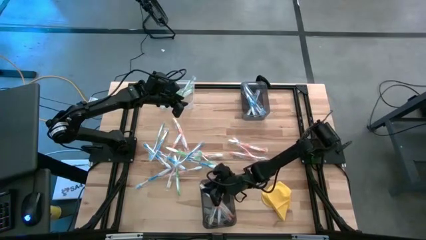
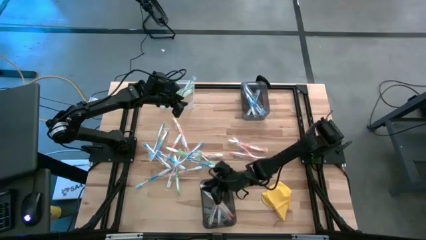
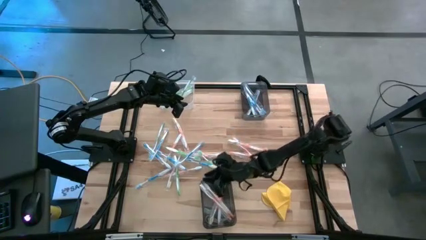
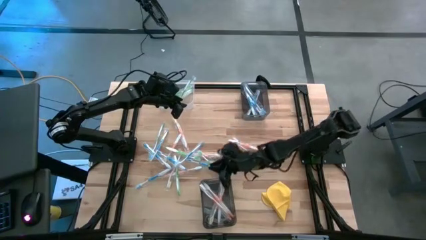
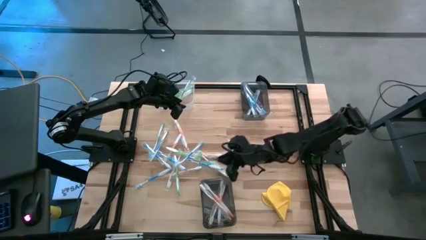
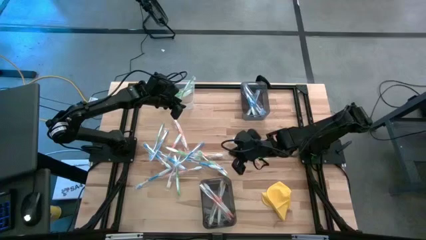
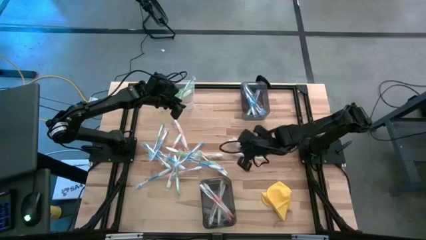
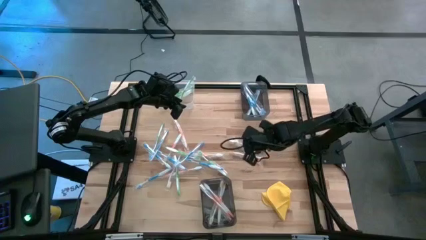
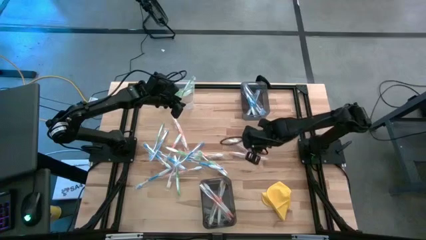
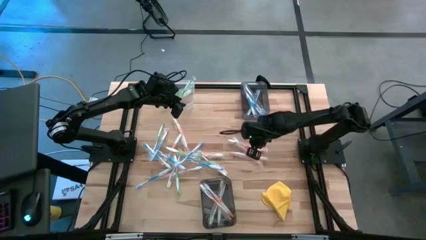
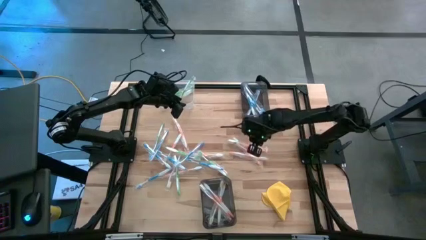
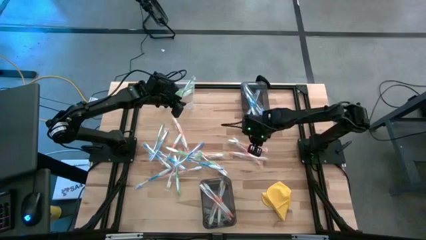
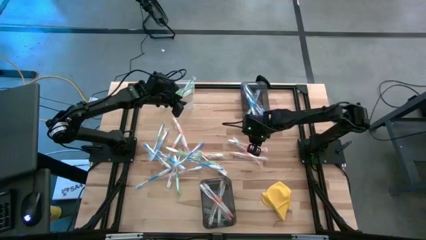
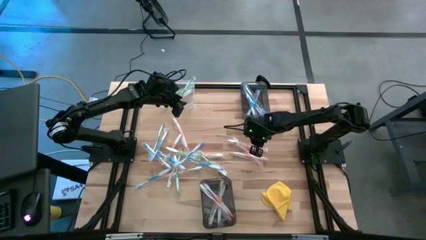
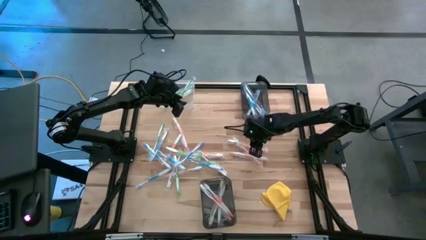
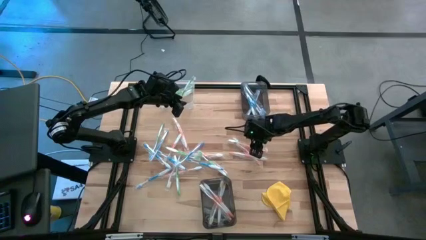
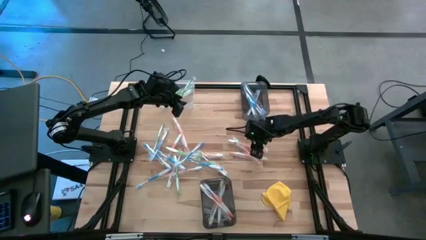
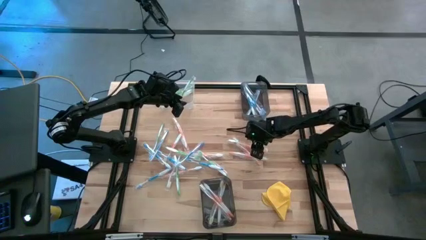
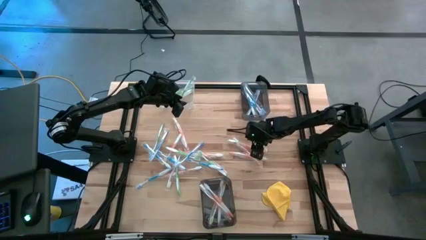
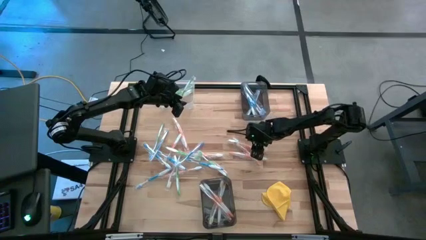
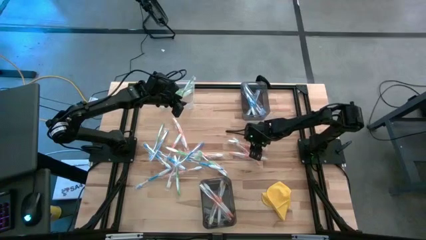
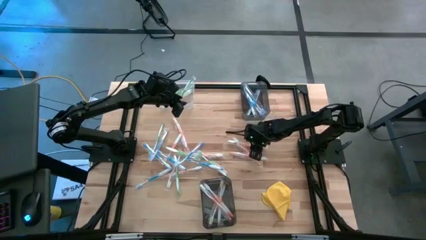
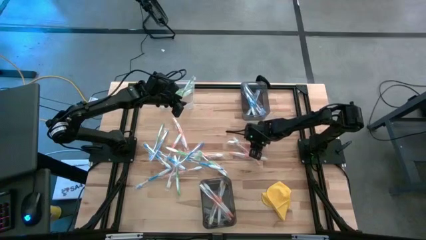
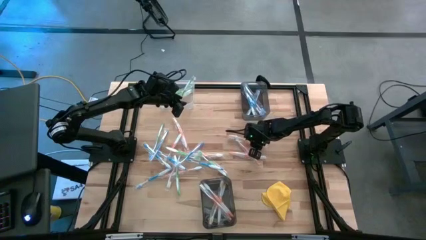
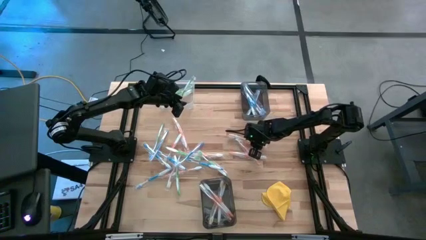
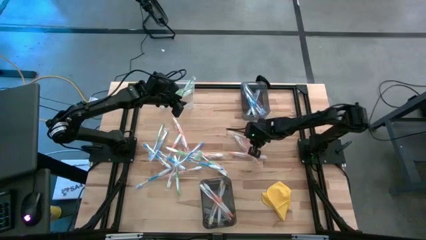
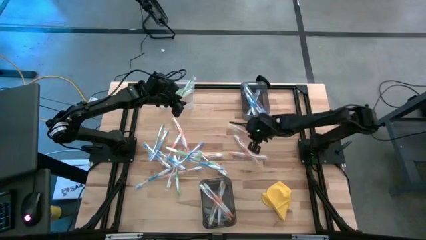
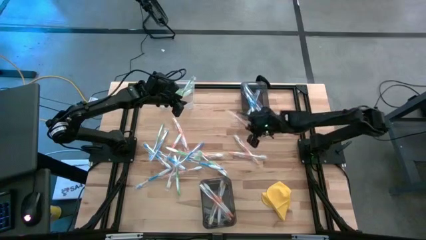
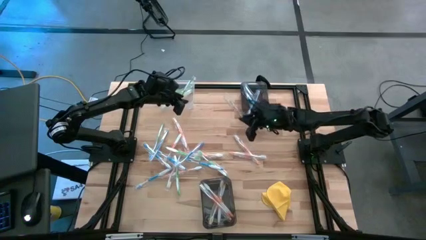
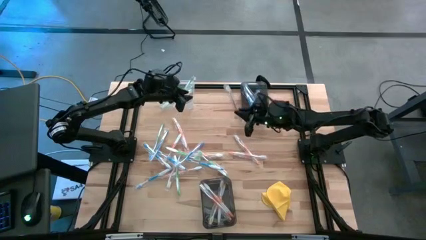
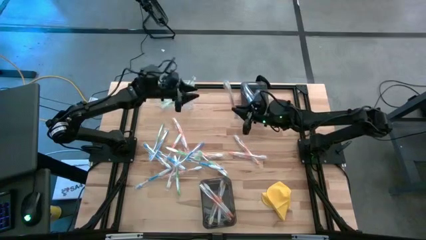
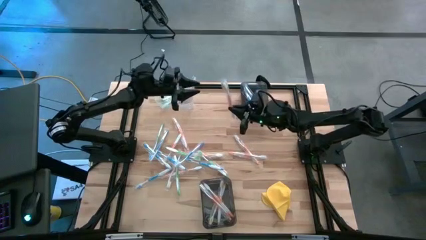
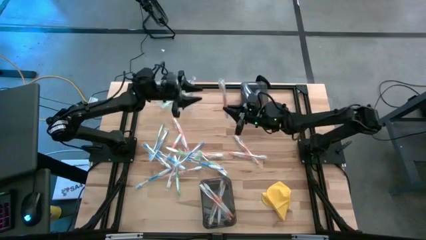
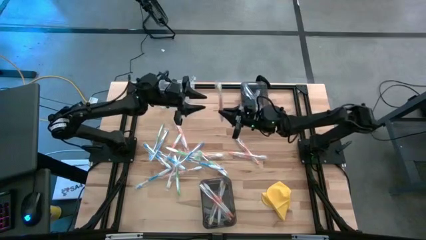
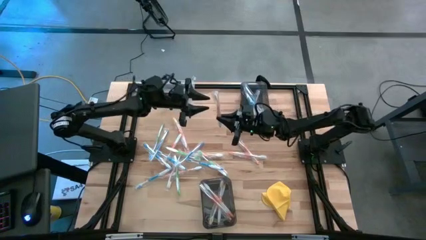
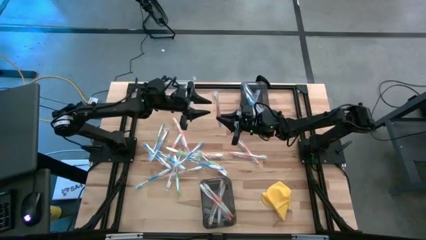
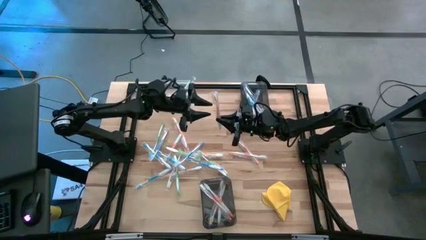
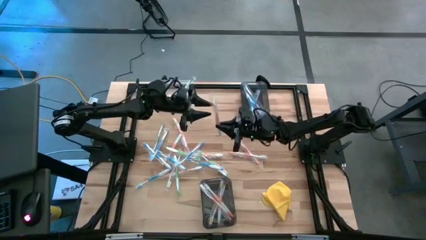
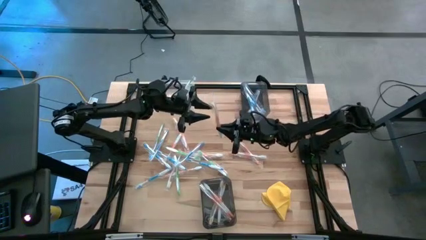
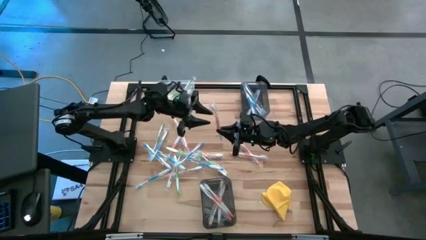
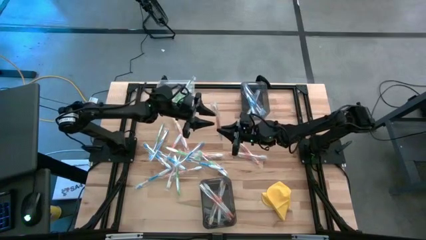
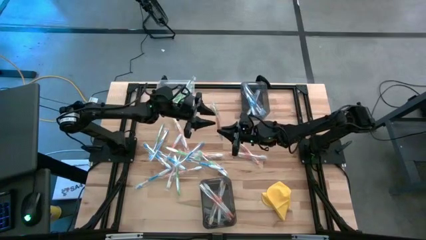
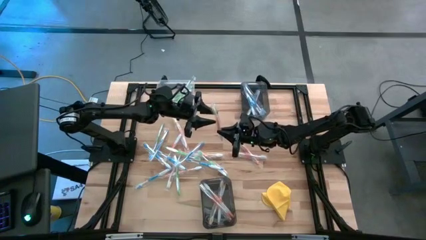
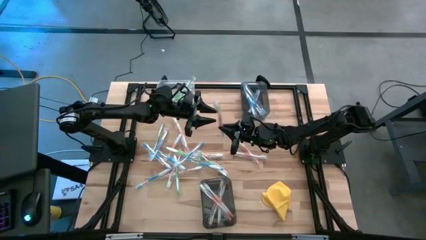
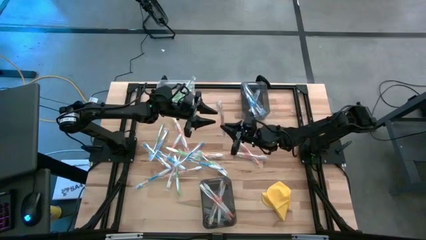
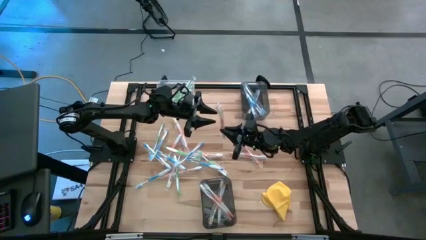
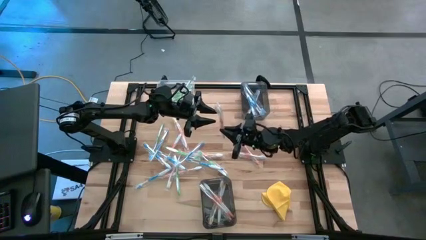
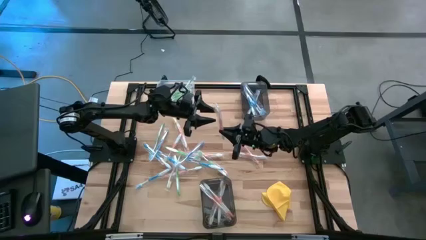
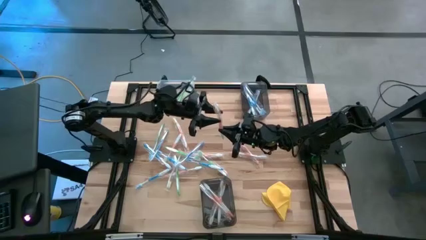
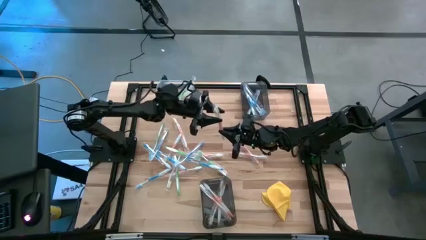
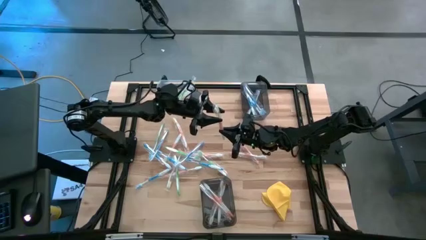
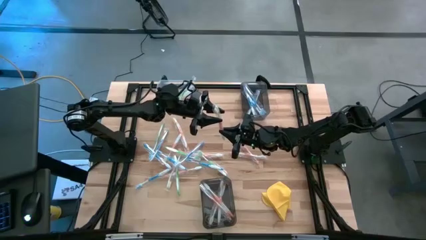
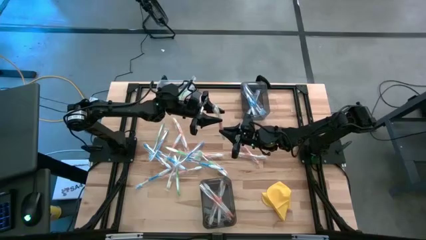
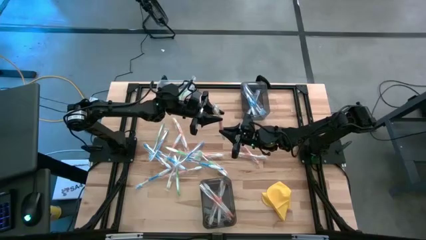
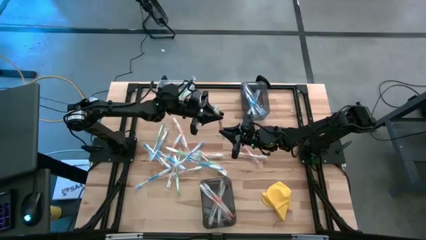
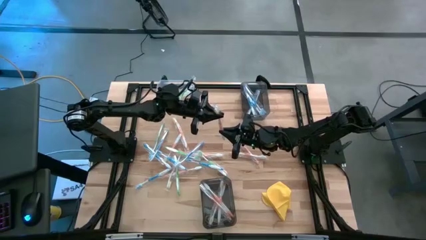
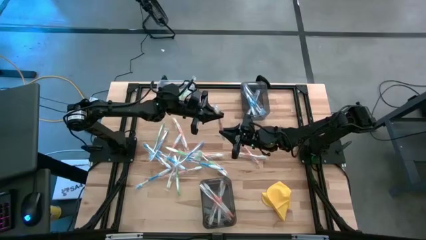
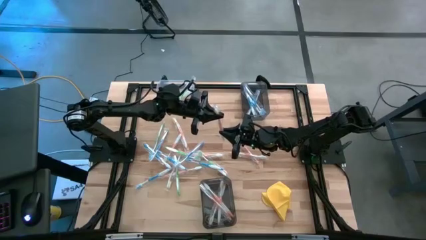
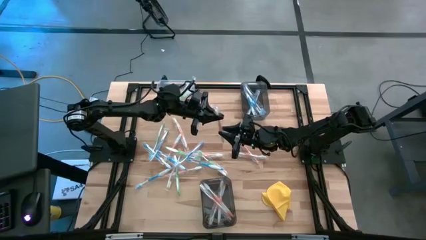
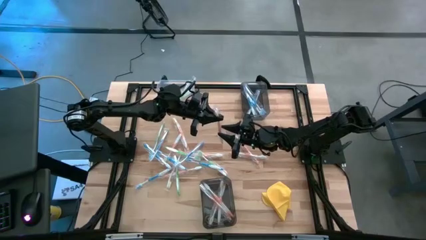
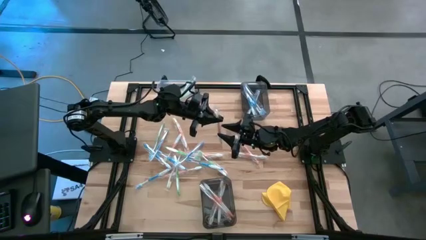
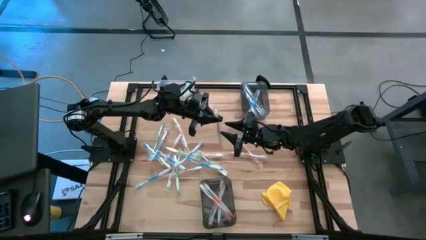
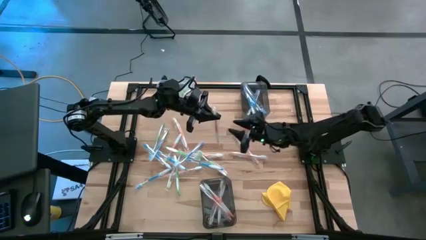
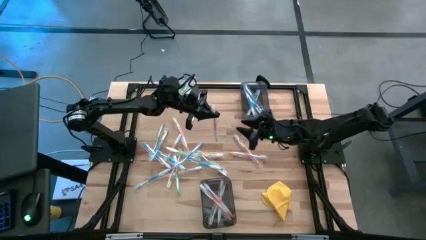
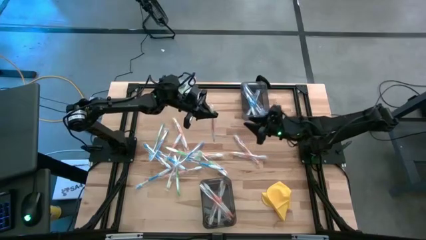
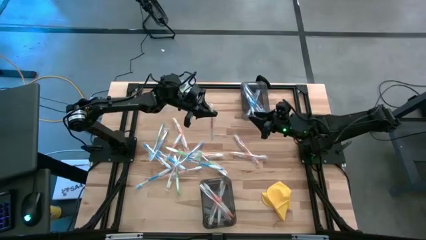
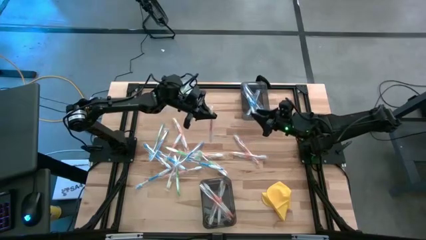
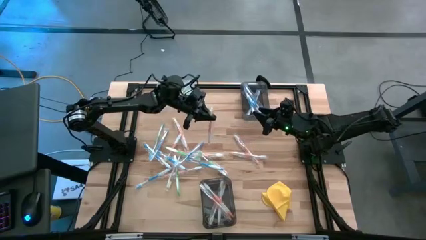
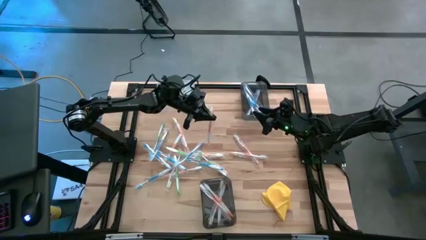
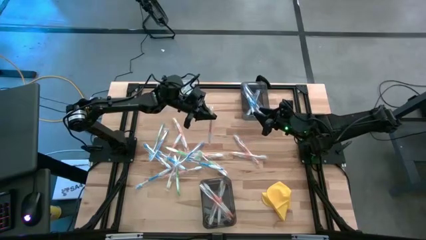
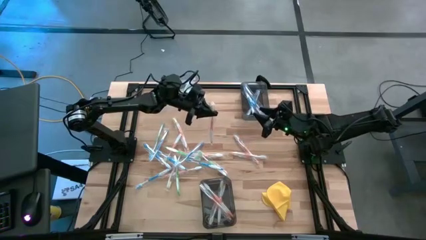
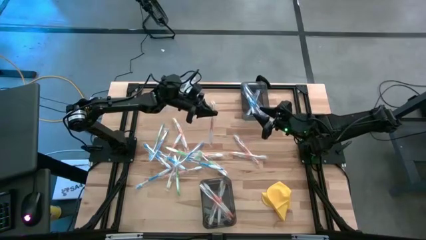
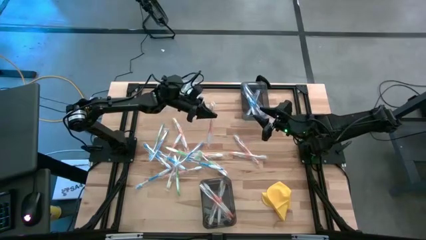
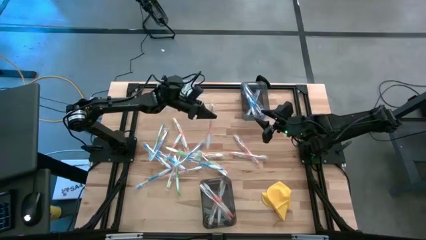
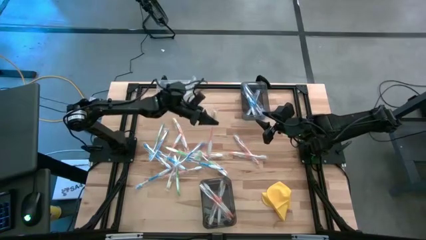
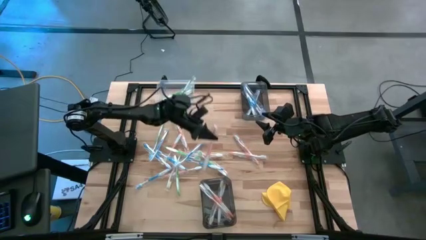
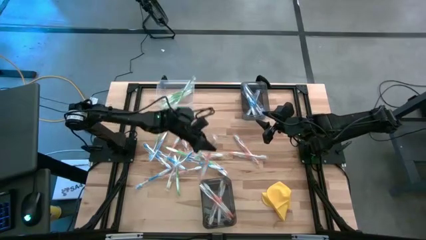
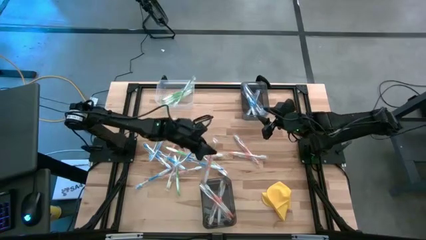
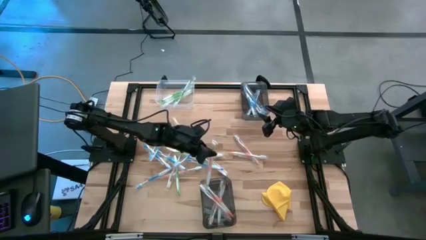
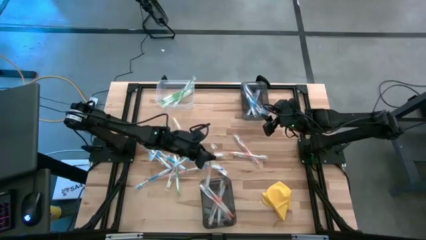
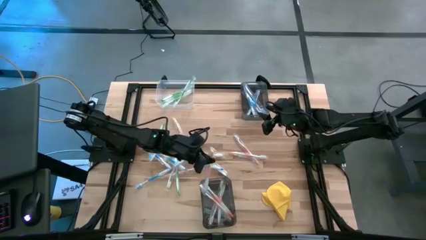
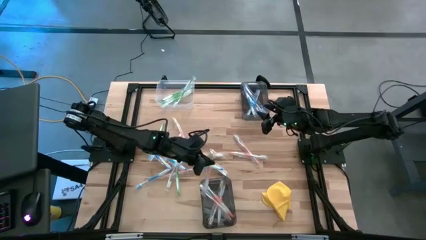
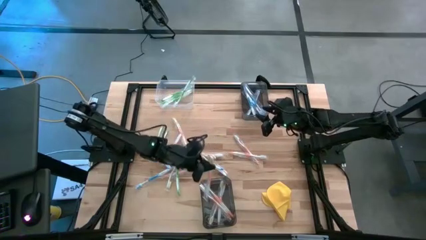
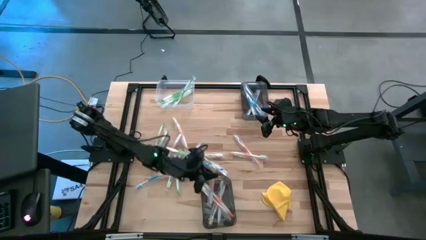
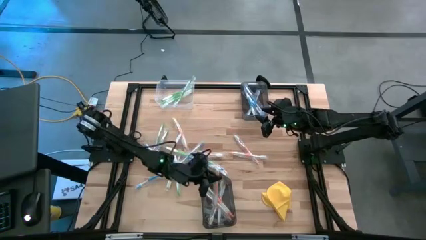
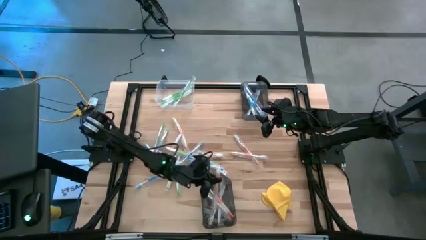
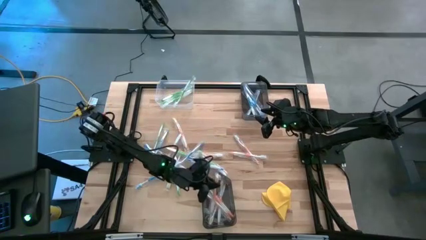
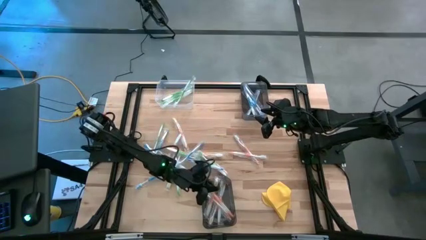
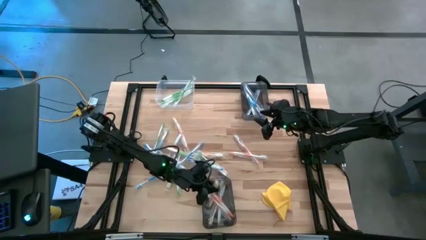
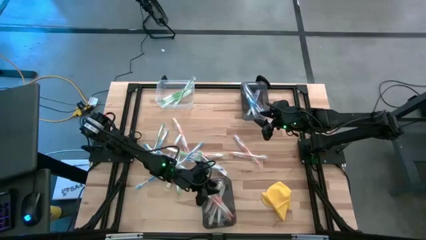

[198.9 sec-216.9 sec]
Task: Pick & Place Toothbrushes
Put the orange toothbrush into the bottom black bin
